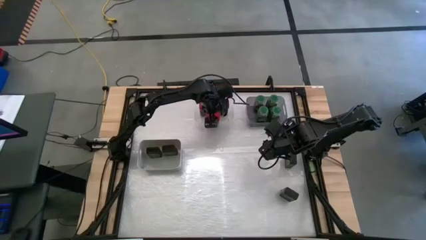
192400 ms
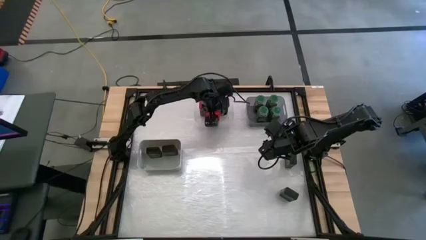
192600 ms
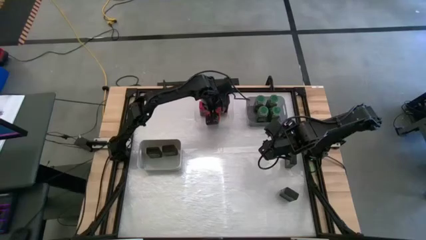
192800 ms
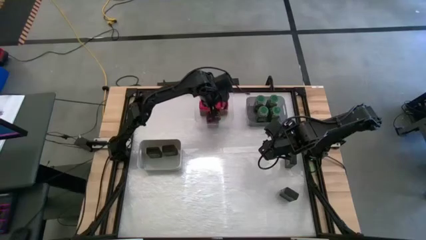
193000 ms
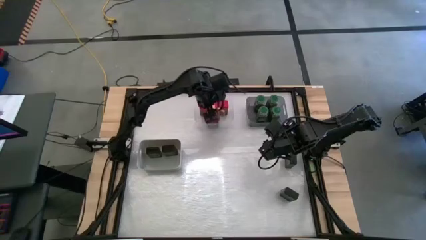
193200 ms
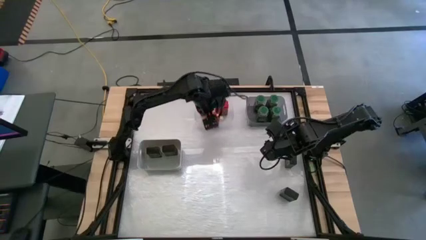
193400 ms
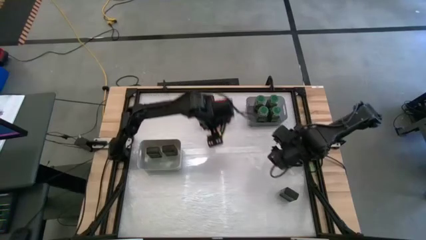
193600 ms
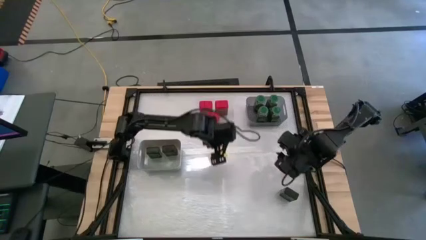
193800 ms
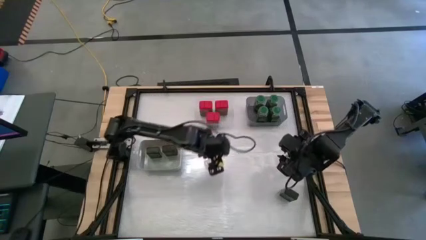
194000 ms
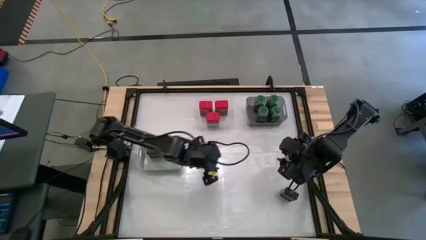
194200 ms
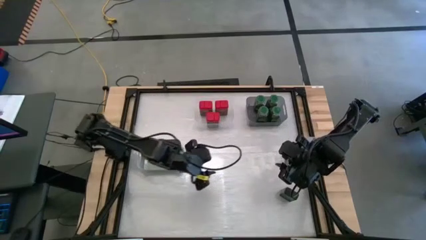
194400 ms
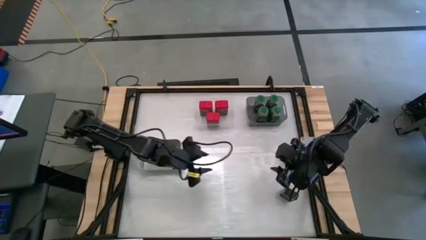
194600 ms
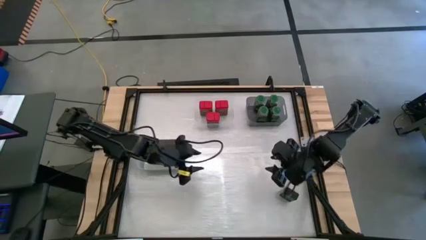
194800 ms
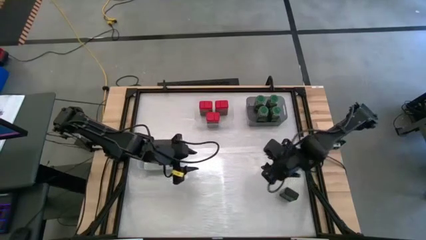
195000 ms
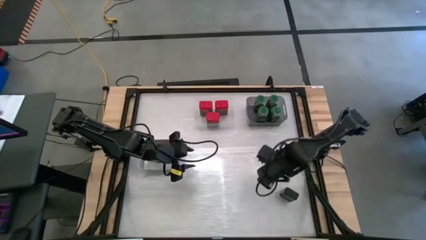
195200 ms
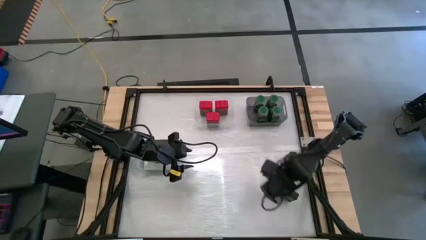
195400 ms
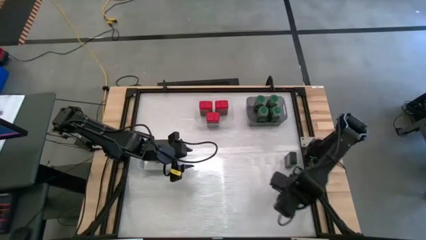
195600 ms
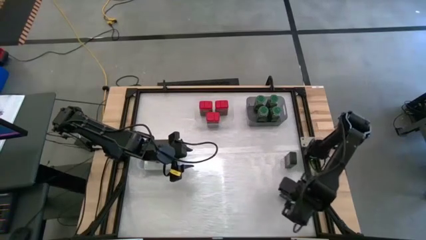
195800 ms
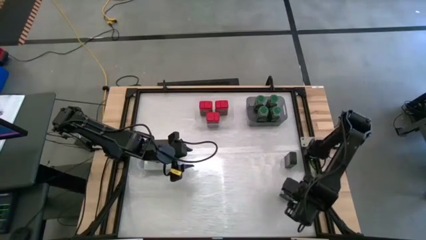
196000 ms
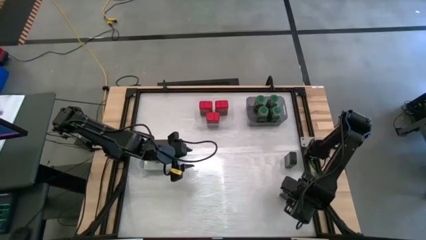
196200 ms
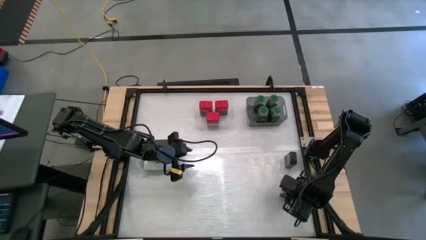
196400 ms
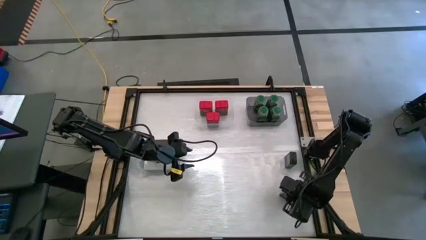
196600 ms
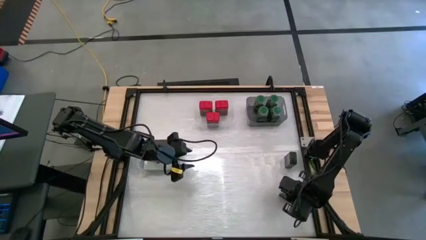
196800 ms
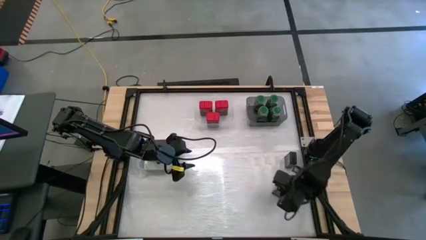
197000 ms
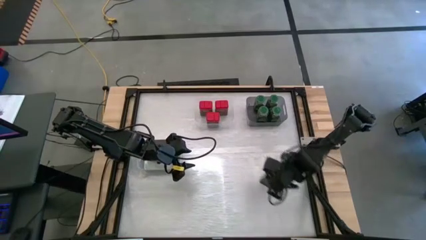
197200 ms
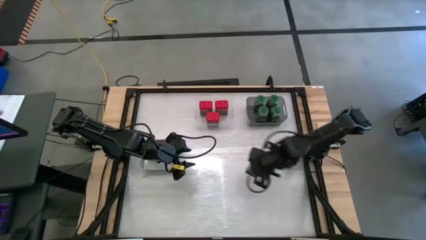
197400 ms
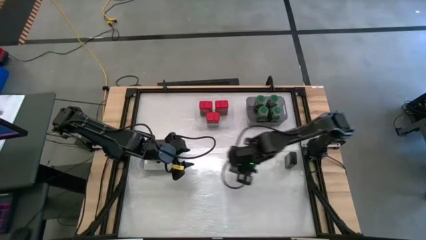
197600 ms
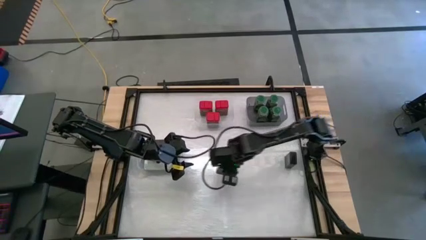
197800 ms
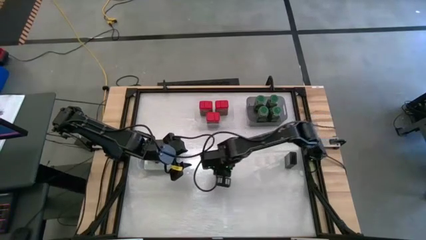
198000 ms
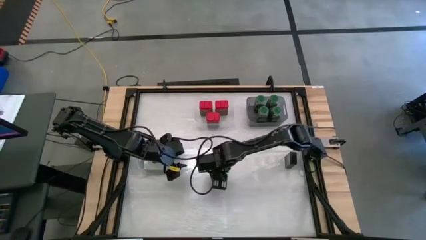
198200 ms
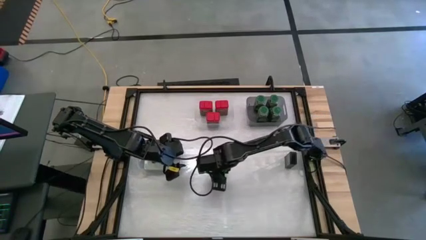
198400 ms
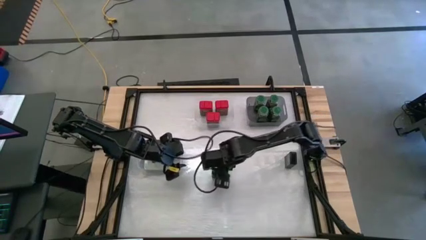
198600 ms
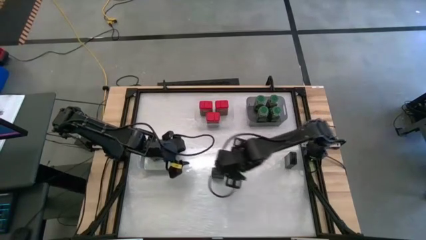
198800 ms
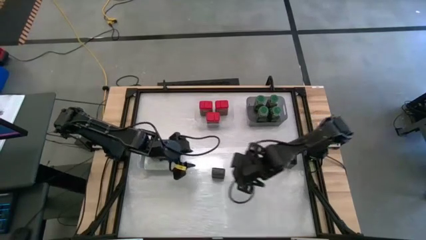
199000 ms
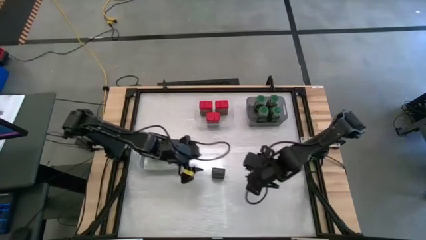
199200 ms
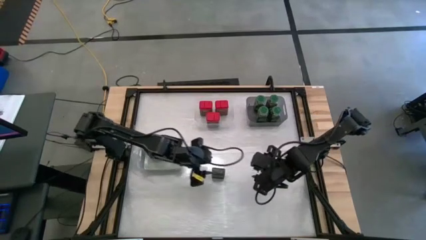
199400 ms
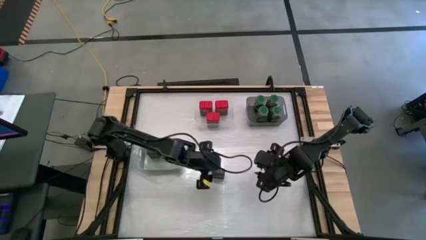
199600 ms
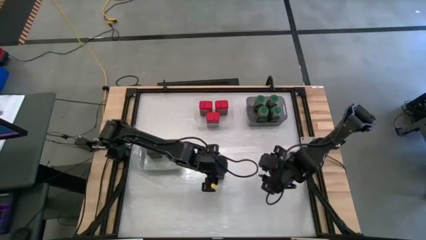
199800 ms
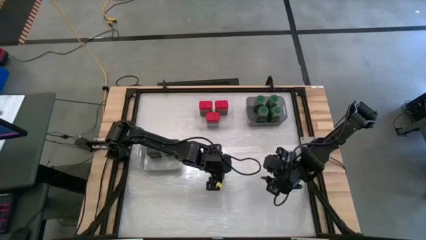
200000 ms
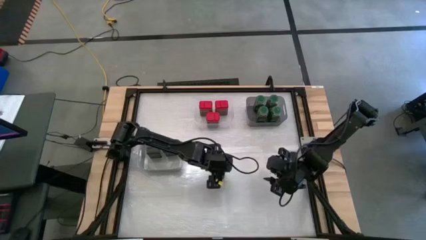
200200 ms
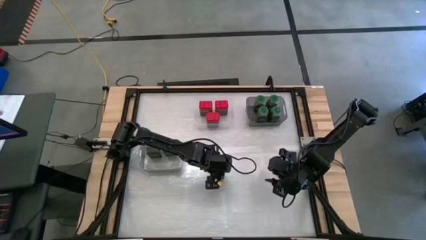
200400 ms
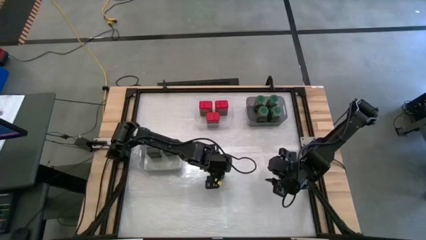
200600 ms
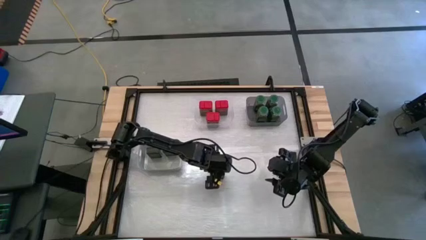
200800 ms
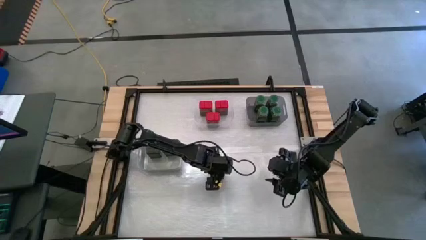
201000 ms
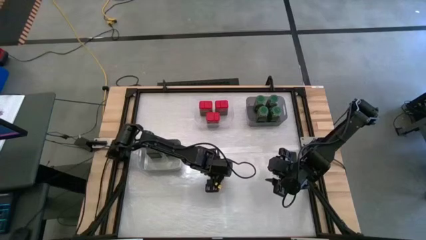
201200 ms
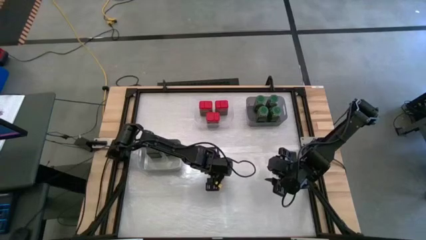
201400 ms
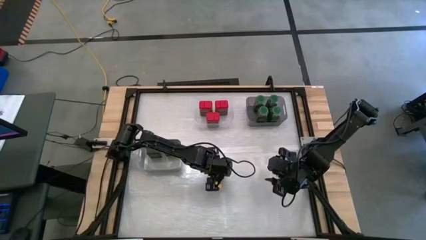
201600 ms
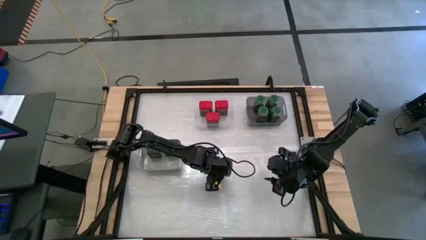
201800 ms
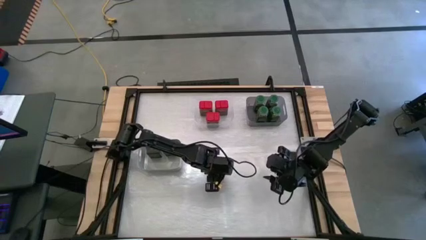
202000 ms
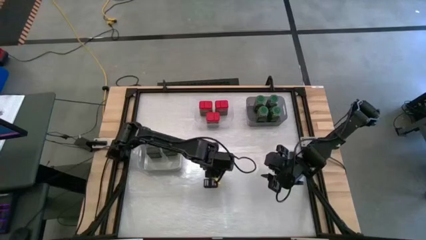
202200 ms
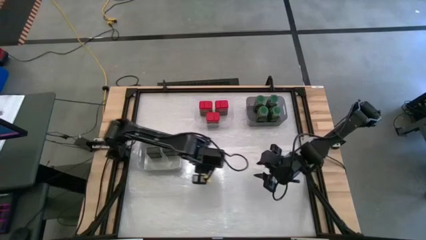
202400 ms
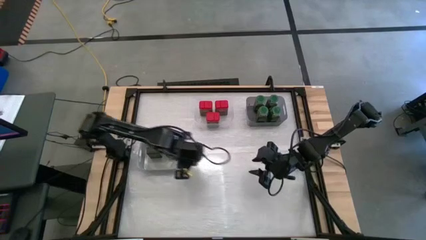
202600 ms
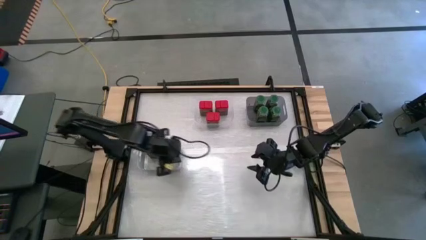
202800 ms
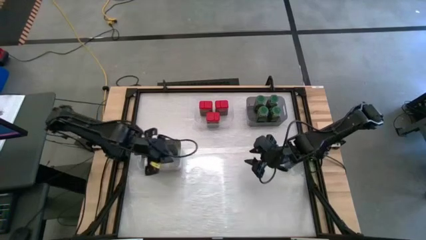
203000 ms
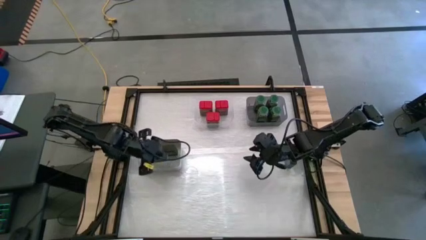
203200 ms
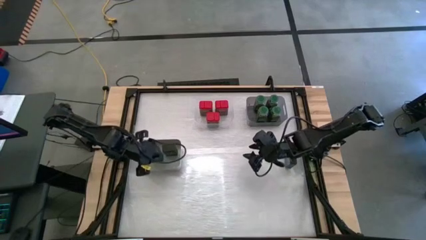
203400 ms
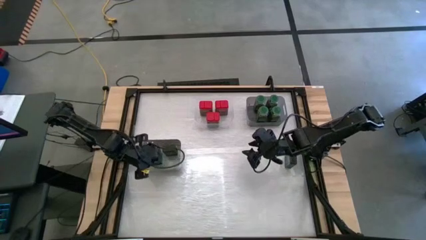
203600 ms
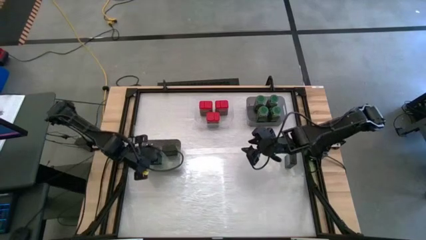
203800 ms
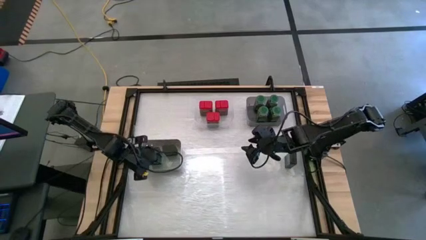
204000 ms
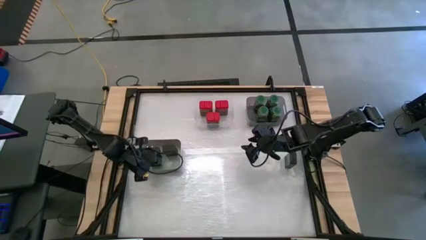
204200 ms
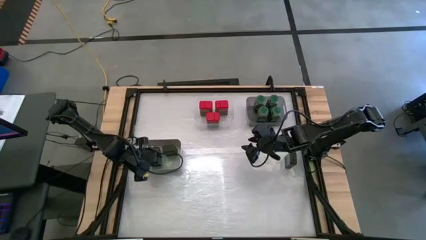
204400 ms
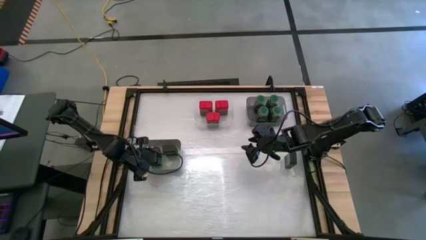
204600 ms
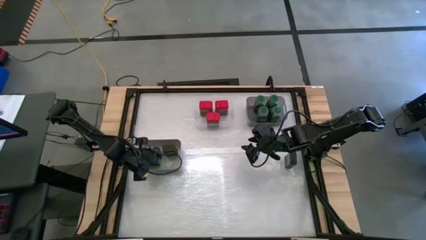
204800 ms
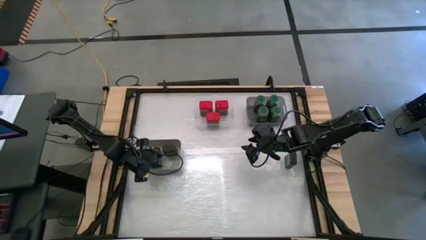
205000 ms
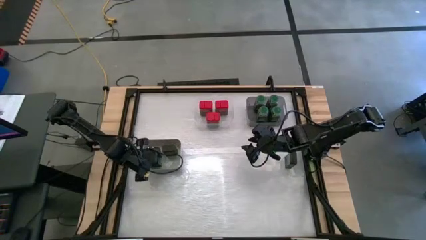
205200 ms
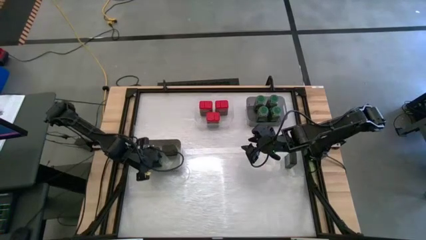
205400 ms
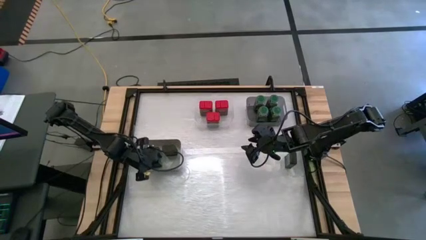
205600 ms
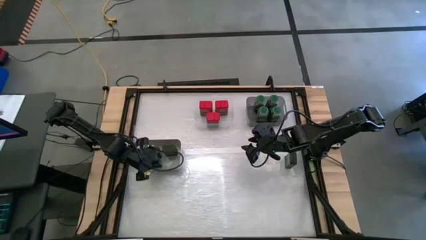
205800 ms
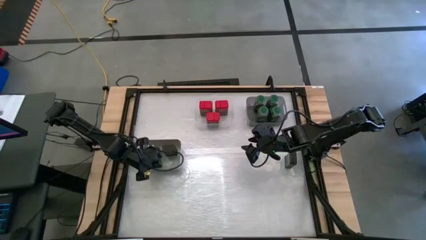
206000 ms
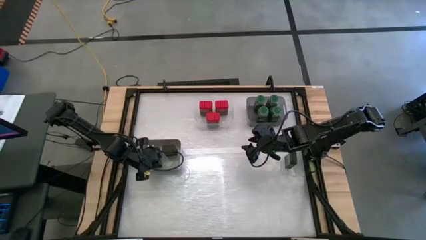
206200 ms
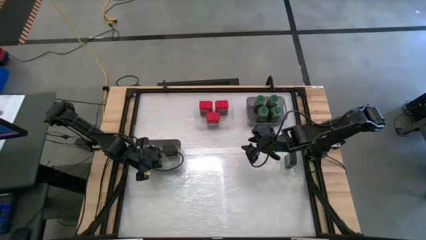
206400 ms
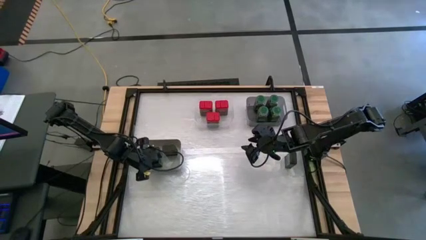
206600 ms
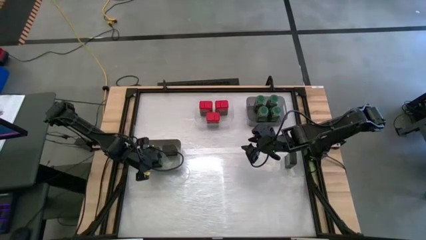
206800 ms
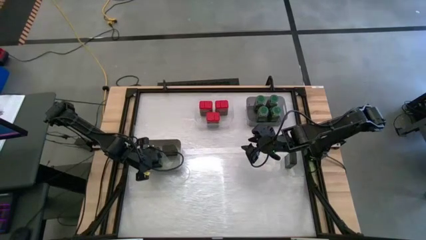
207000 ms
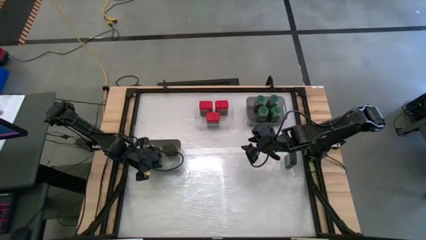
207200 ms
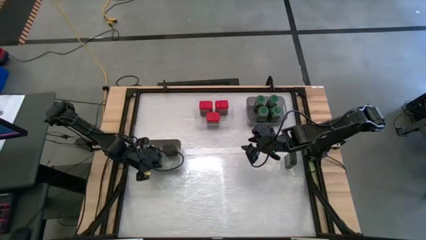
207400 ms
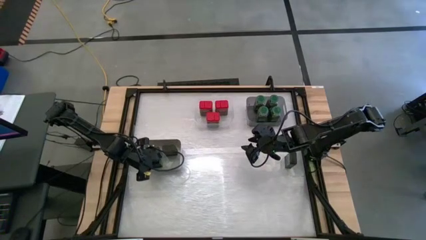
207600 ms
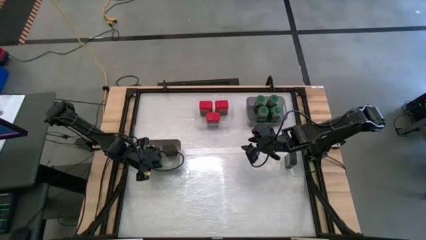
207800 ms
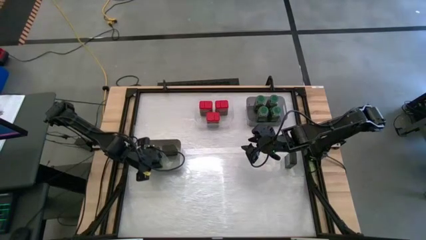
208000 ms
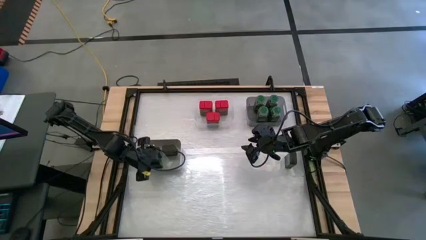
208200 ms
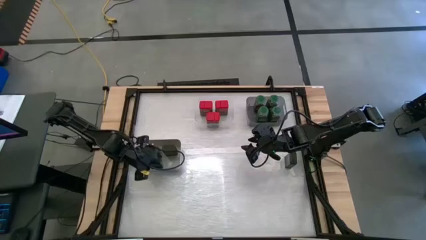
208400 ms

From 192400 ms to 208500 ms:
Task: Sort spices by type
Put the black seasoning can into the gray bin

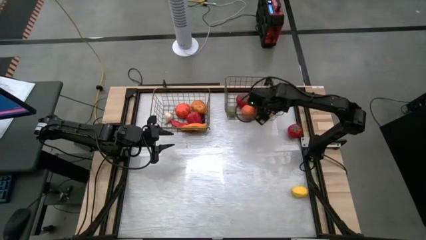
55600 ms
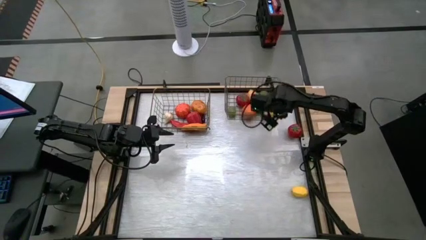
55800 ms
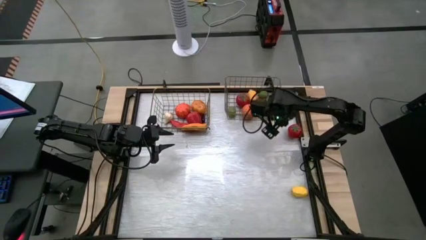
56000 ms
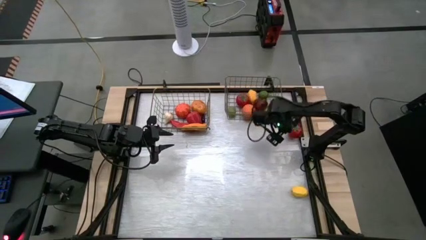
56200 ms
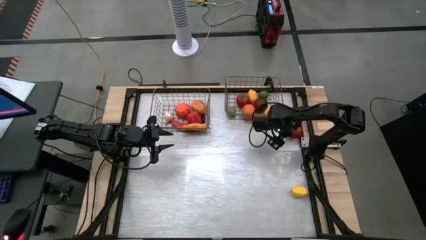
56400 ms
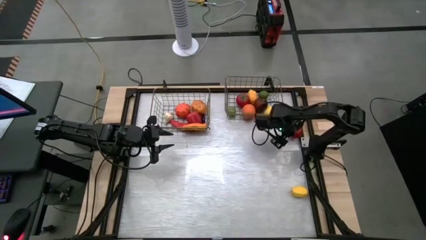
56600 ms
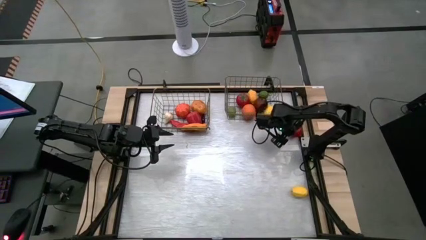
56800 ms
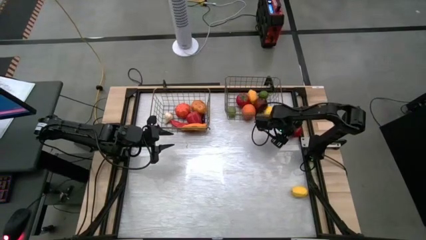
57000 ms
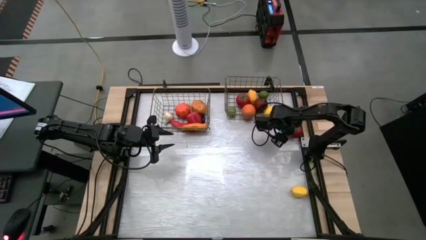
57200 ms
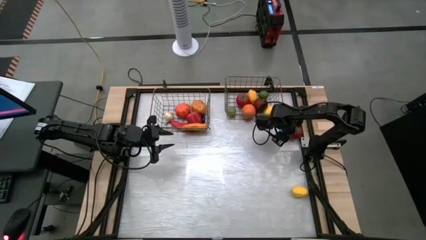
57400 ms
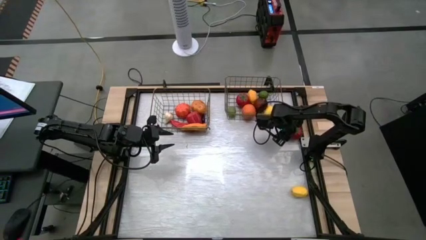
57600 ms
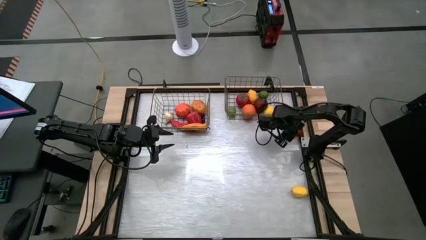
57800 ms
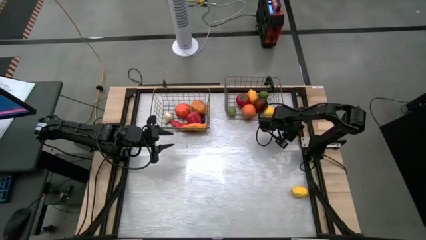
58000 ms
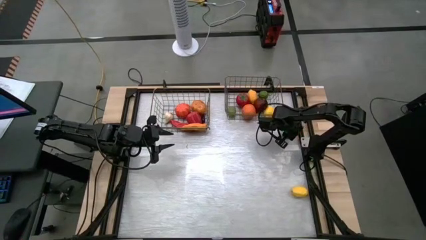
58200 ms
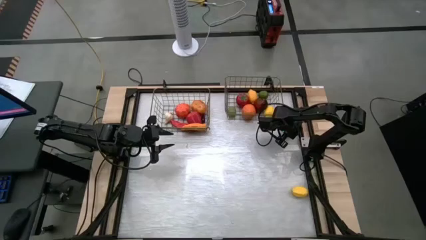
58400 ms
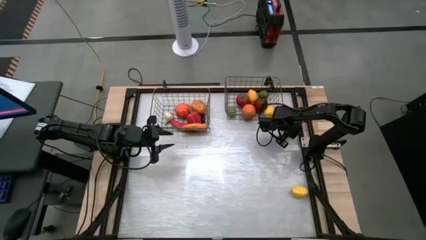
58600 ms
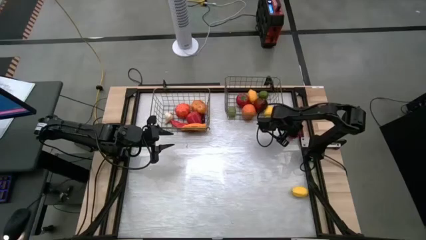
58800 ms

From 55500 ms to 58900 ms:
Task: Sort produce into baskets
Put the tomato into the right gold wire basket
